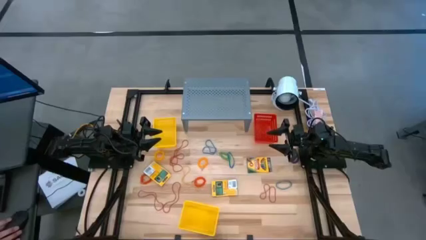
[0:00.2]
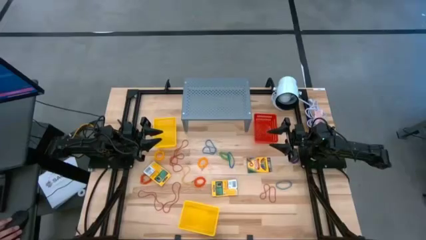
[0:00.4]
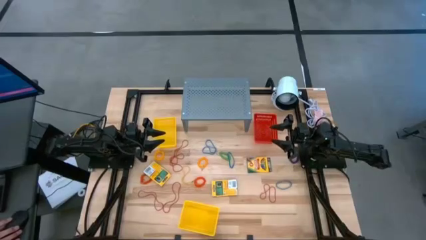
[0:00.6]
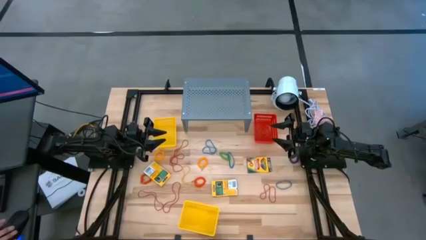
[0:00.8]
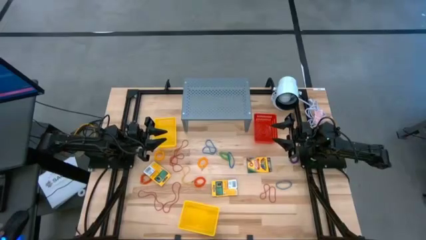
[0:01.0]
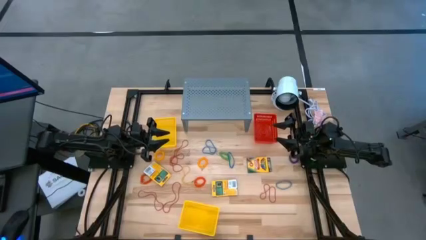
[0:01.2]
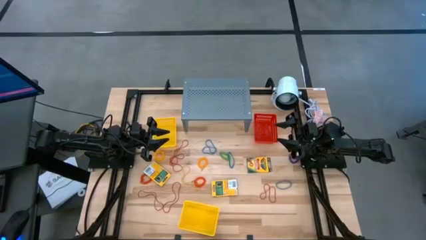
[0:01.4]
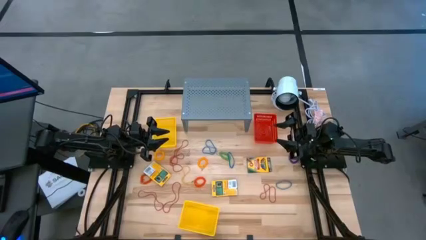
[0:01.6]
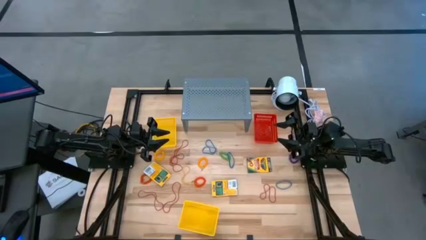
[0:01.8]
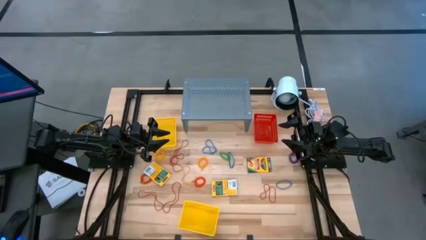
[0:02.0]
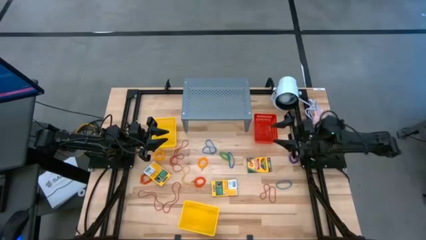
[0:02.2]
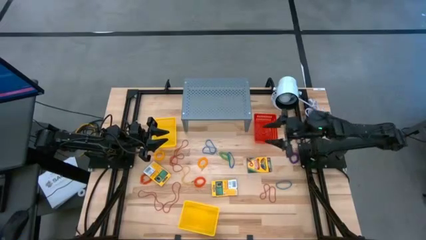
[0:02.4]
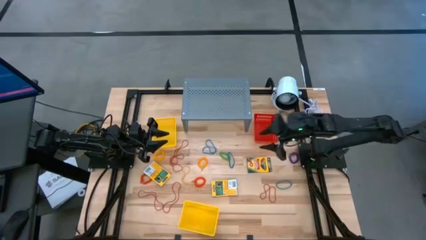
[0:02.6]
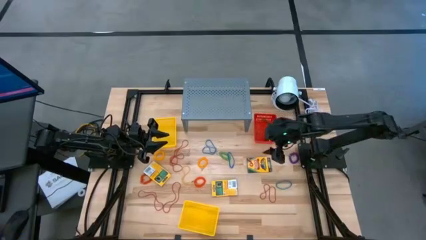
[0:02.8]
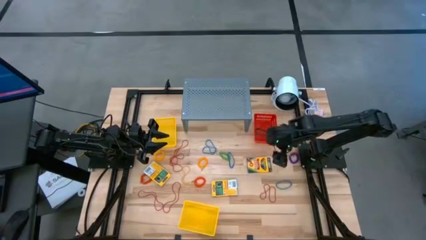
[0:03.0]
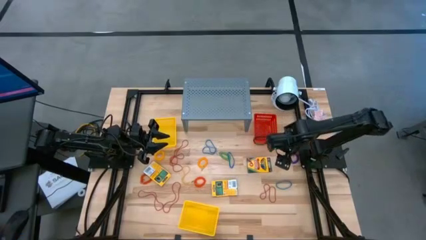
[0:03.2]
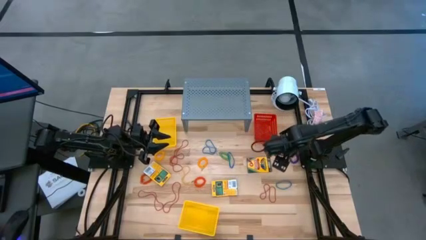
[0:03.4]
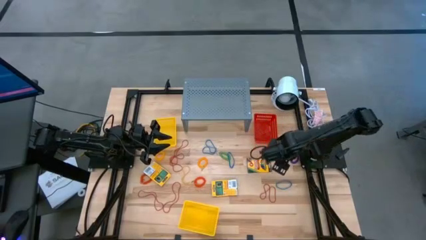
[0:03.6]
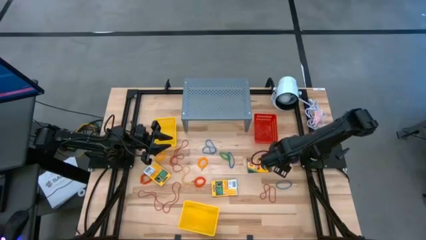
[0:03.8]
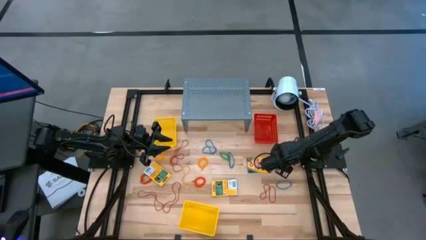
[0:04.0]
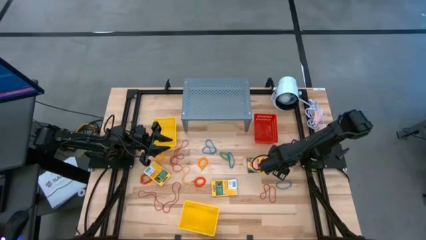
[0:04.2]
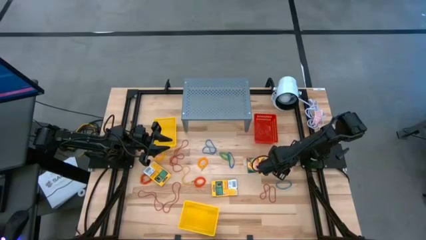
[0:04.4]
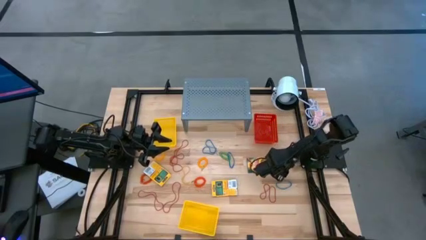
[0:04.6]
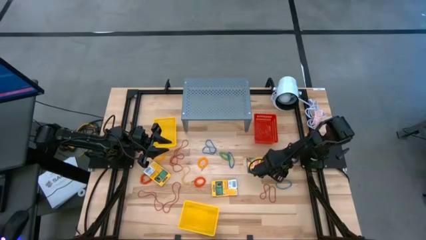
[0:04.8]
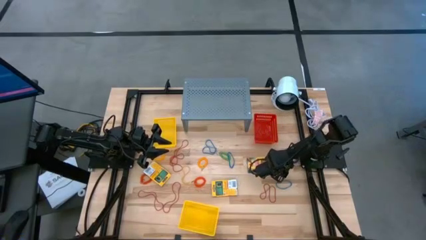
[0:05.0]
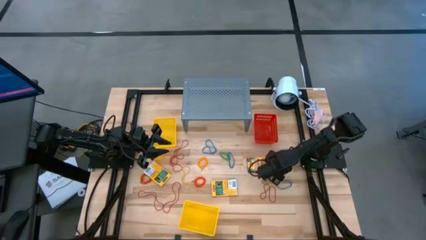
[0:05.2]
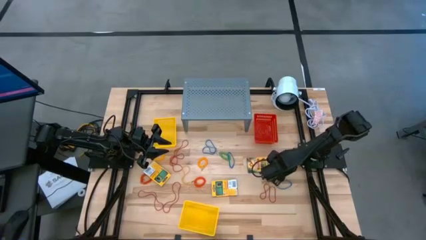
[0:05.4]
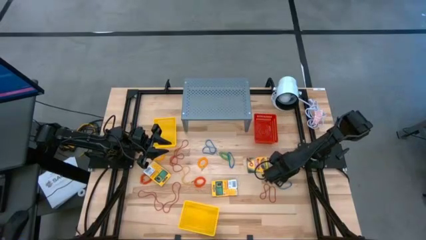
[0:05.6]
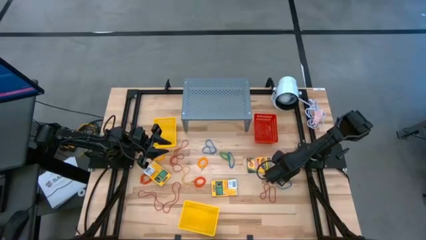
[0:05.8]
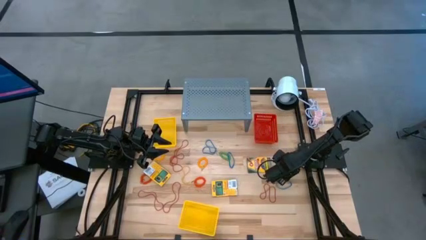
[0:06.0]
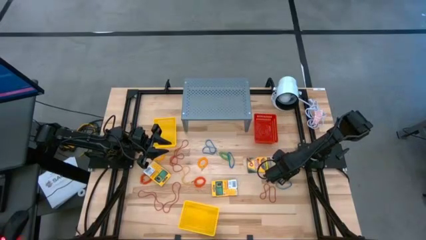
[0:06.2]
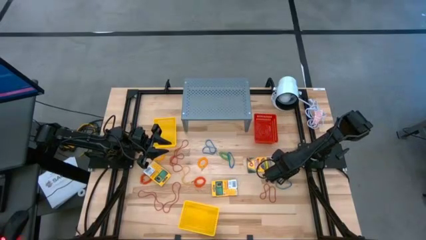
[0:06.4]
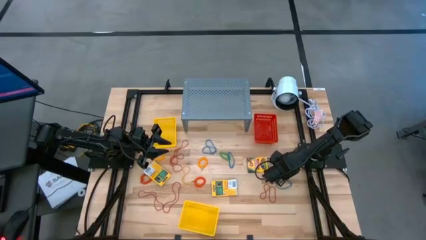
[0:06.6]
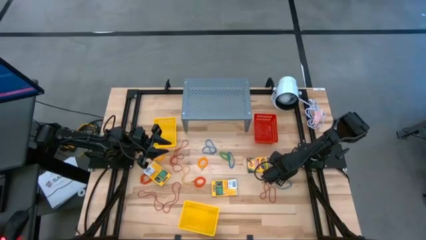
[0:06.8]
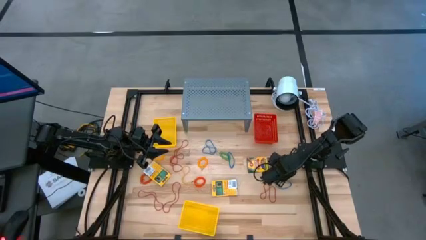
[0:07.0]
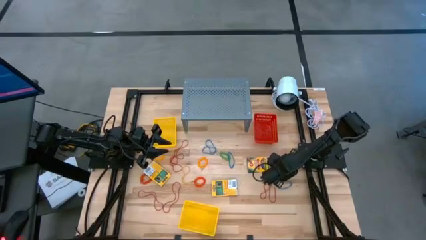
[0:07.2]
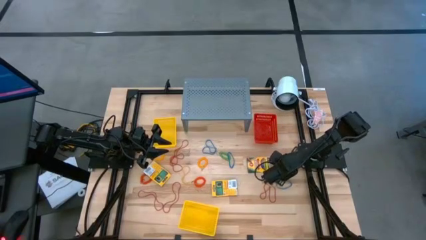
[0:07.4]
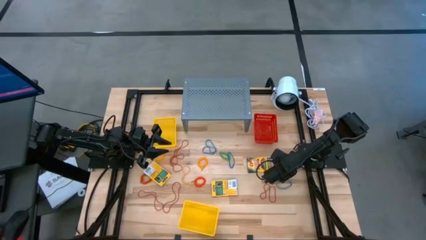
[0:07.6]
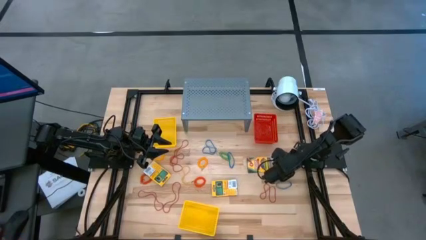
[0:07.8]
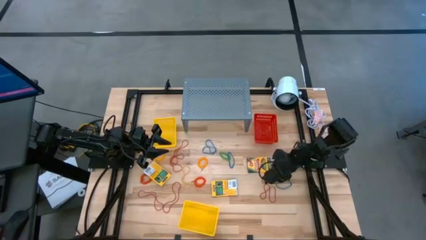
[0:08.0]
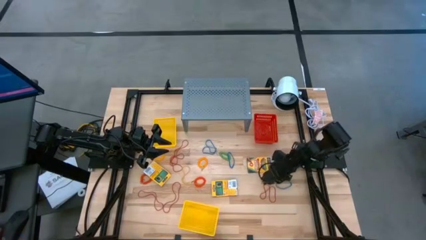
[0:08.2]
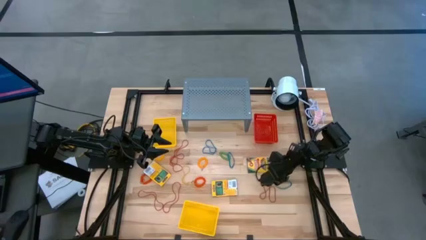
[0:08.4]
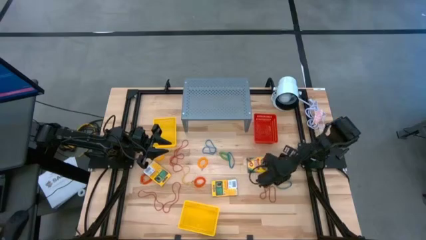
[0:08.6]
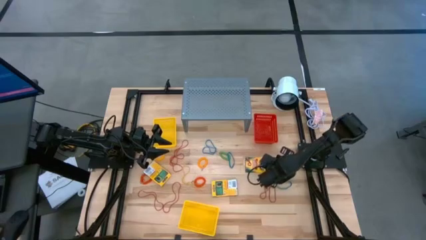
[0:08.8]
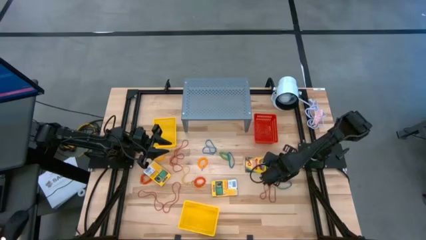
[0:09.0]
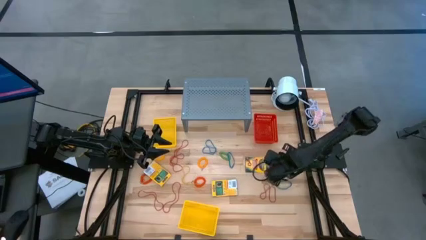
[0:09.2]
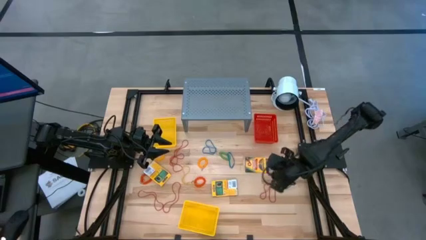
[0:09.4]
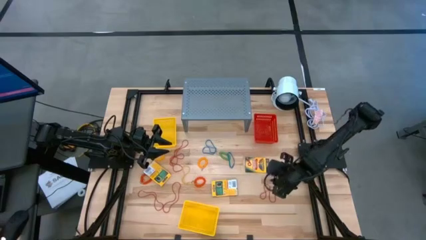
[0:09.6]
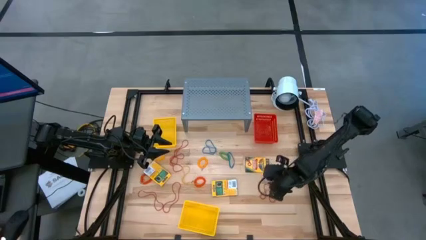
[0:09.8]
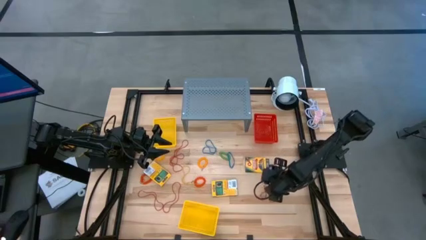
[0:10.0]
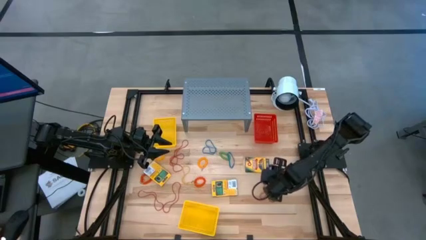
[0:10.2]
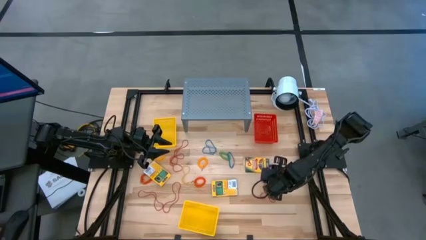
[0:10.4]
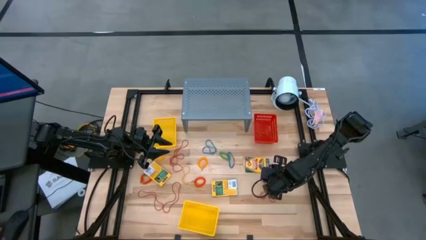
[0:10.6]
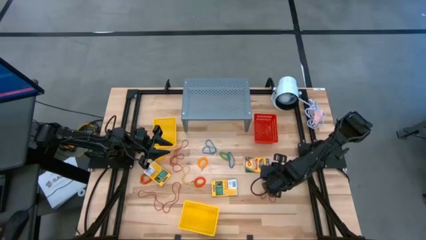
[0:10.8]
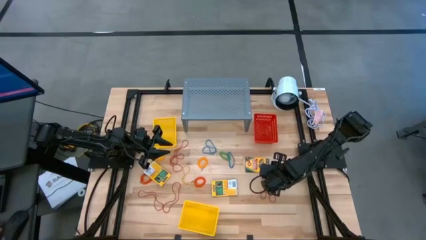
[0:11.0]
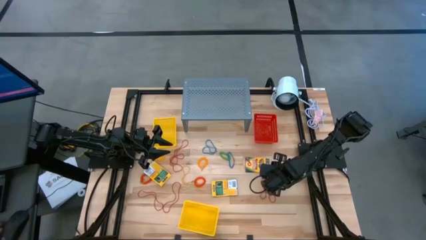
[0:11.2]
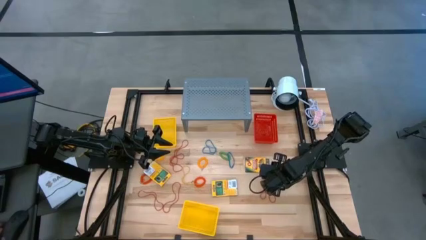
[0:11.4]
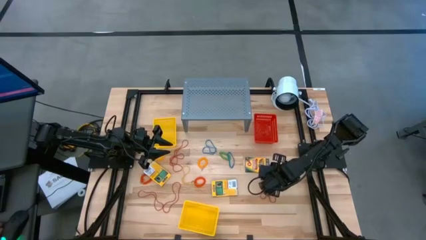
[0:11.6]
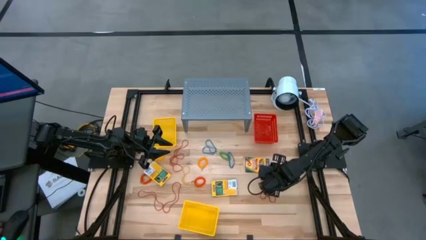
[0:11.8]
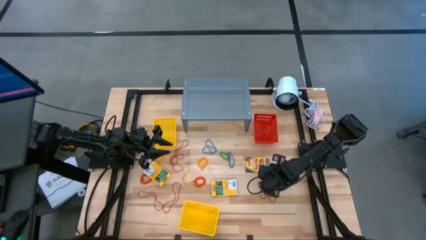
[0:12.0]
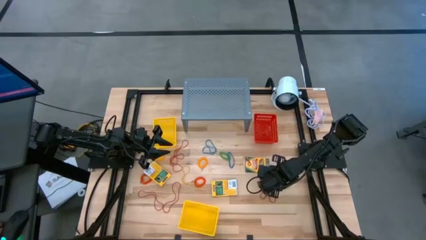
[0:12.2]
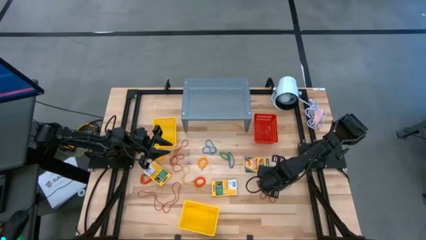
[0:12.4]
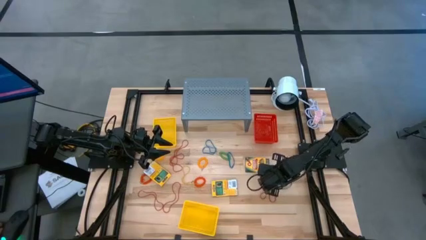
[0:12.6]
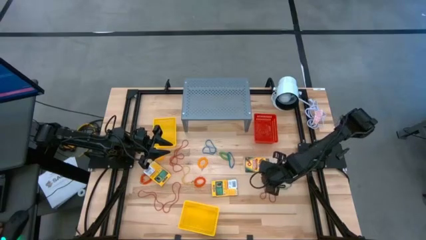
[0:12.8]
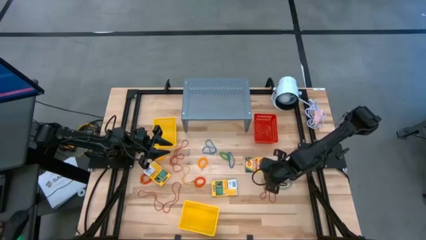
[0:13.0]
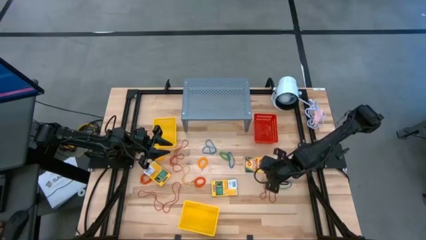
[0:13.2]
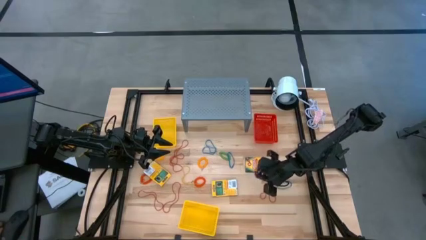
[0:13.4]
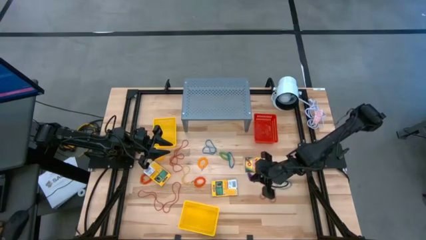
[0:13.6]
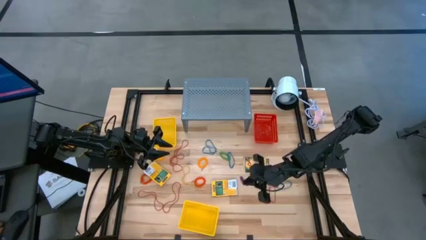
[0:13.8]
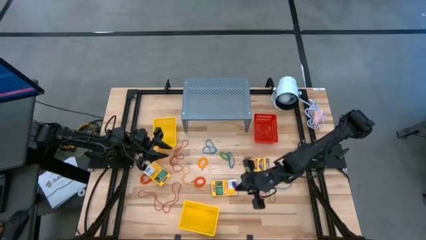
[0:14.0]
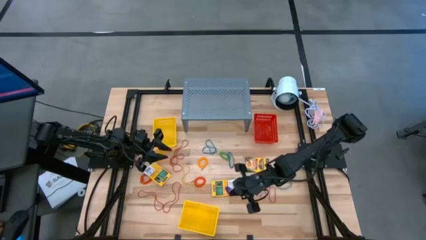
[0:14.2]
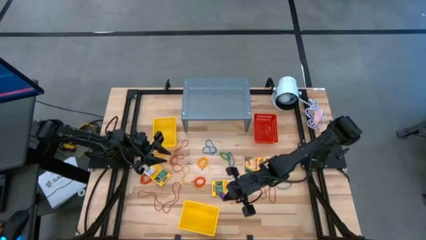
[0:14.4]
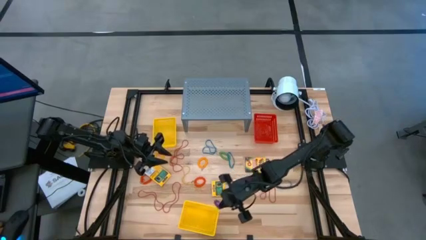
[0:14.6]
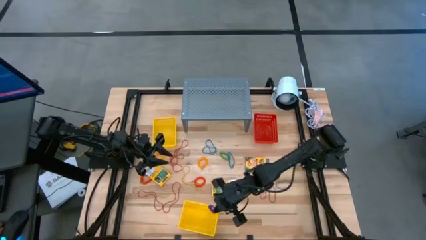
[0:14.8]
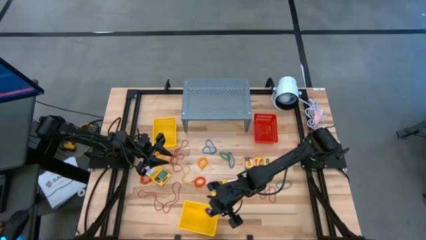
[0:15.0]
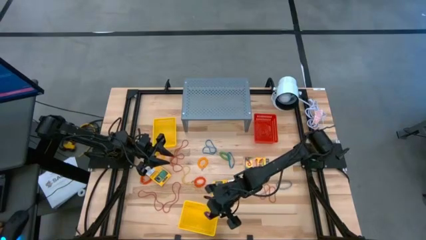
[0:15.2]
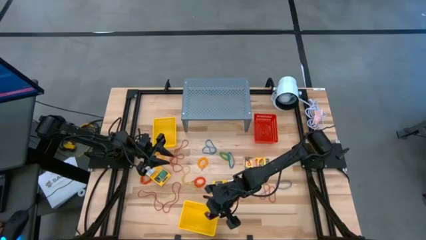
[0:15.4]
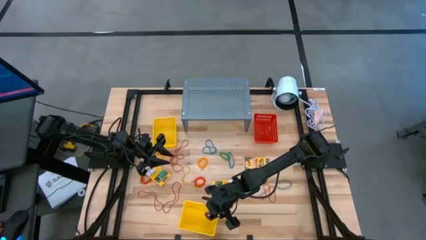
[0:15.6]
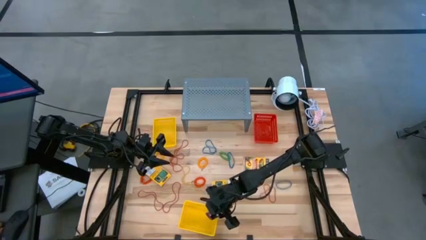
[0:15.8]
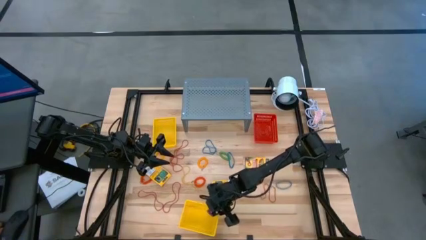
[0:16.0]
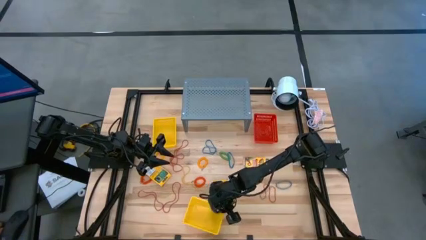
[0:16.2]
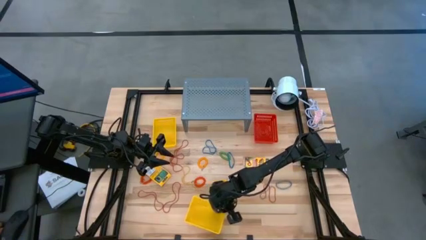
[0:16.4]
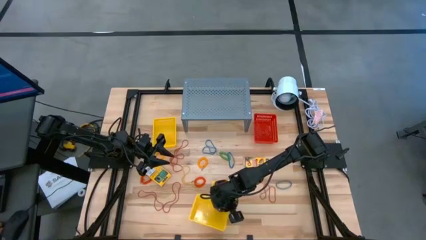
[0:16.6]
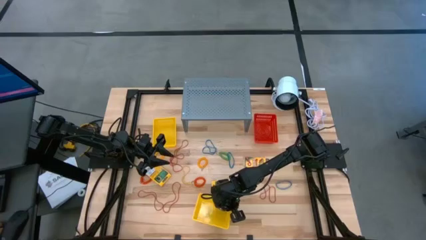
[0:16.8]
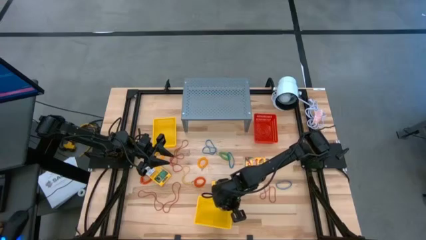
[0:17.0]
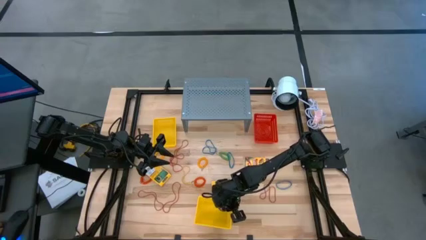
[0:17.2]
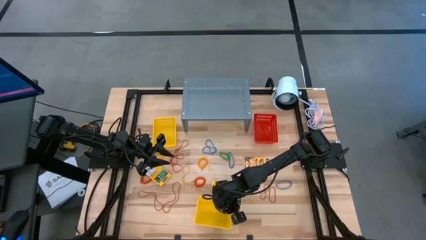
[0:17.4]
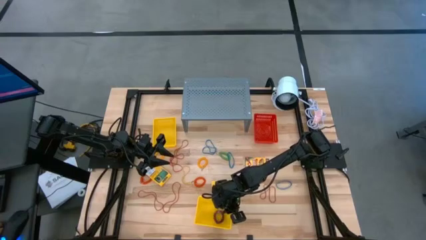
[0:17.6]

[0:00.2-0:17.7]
Task: Pick & Place Office Desk Supplies
Put the violet spiral keychain into the bottom yellow bin
